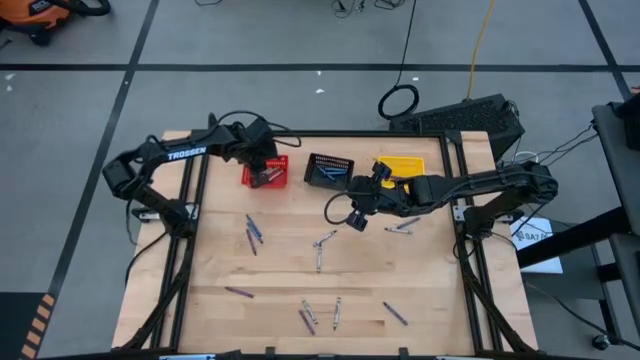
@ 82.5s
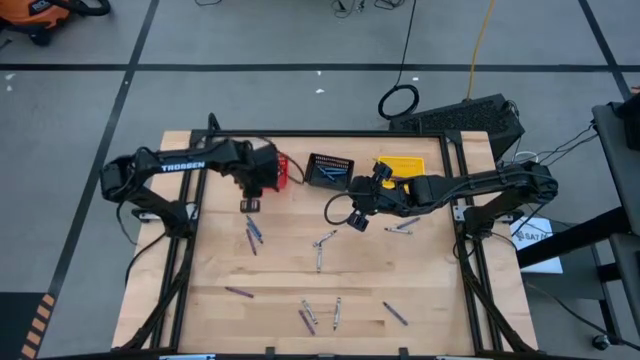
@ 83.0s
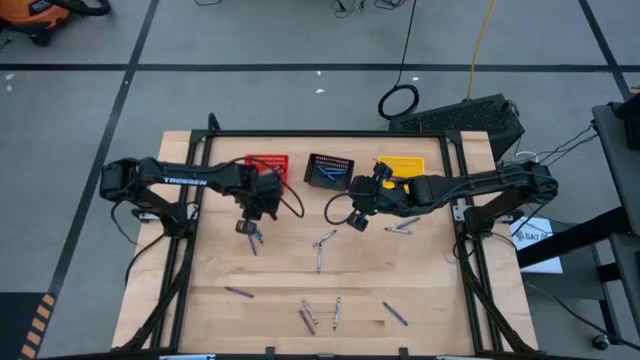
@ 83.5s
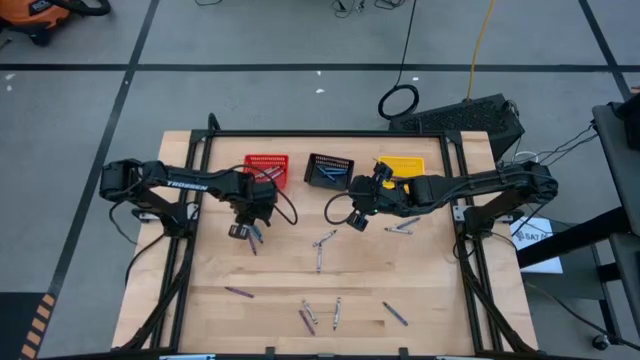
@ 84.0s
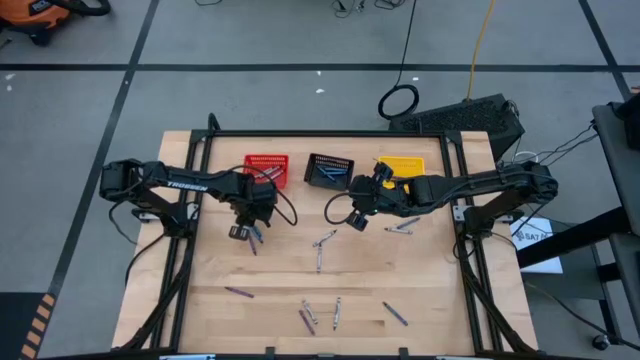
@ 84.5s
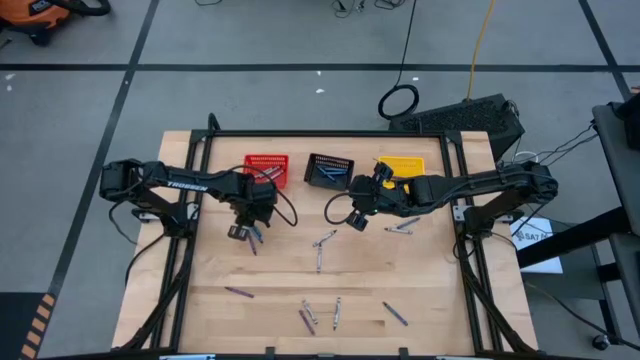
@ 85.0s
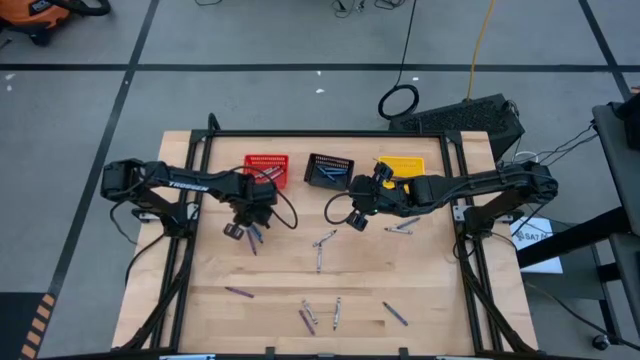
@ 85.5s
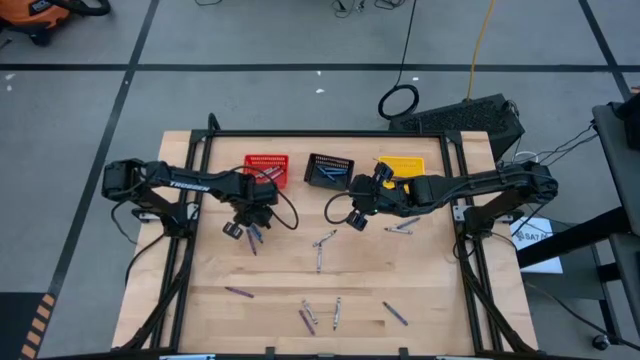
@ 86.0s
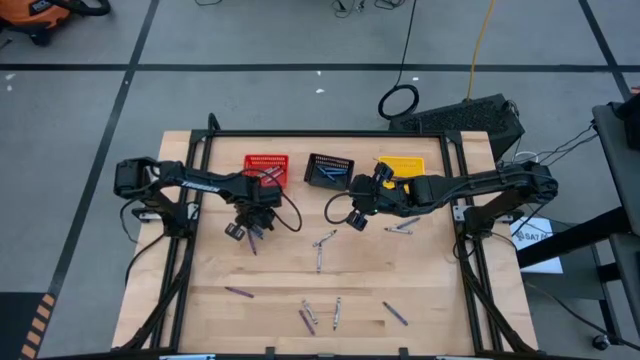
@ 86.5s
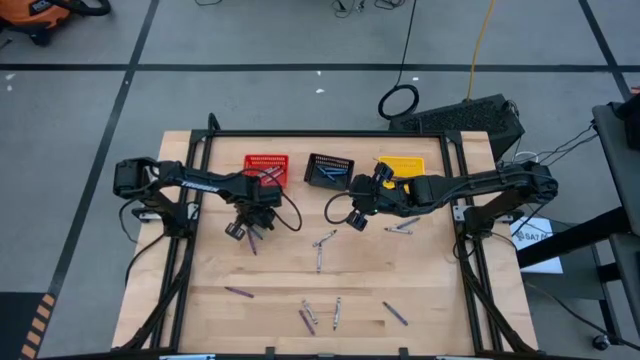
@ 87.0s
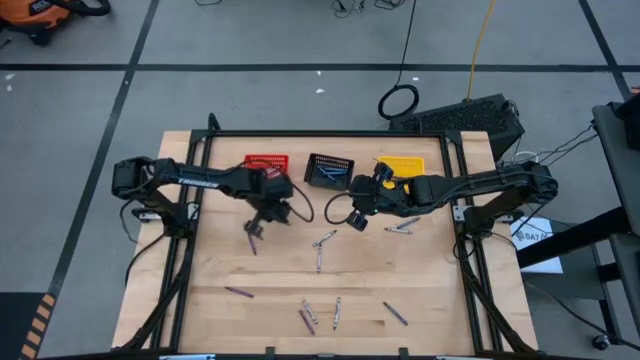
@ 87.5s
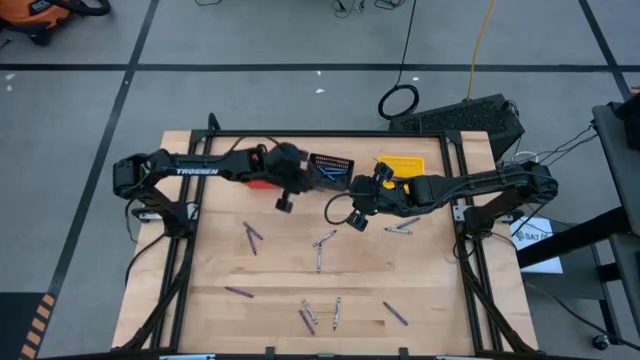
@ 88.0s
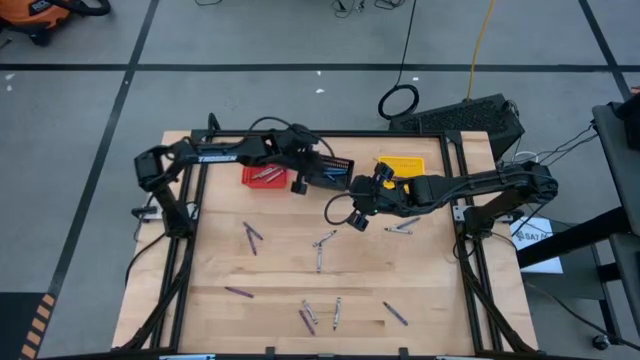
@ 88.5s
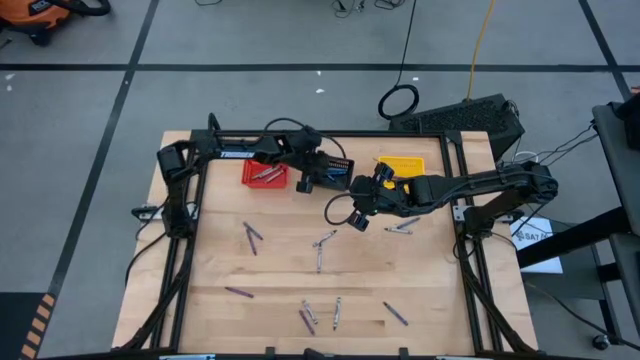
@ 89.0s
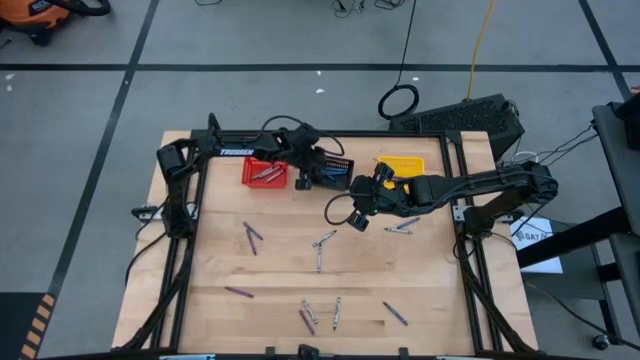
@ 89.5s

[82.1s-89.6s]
Task: Sort crayons
Put the blue crayon into the black bin

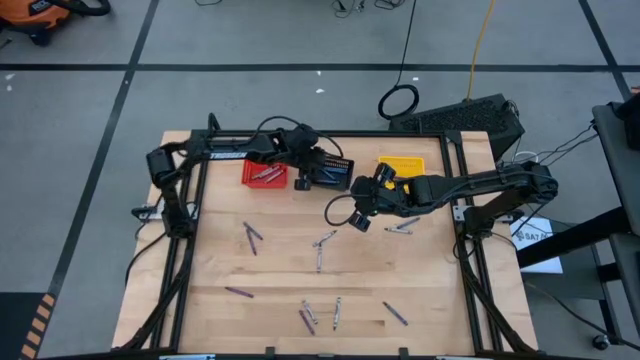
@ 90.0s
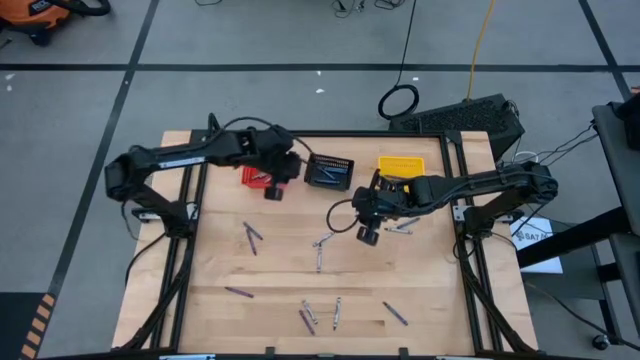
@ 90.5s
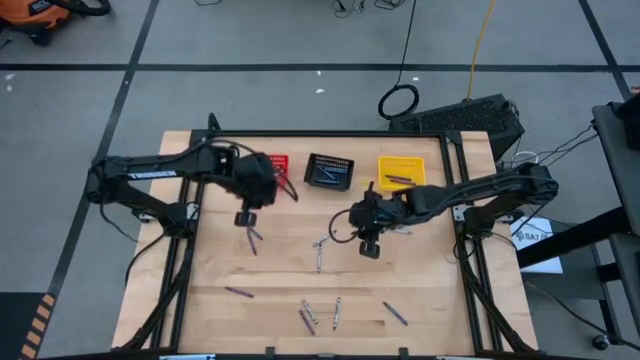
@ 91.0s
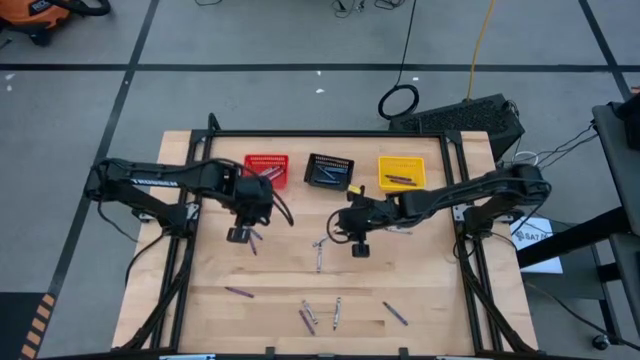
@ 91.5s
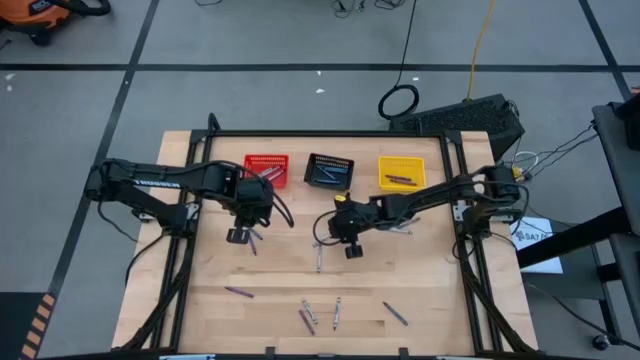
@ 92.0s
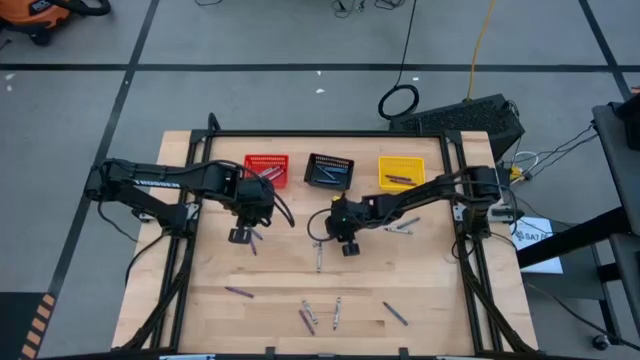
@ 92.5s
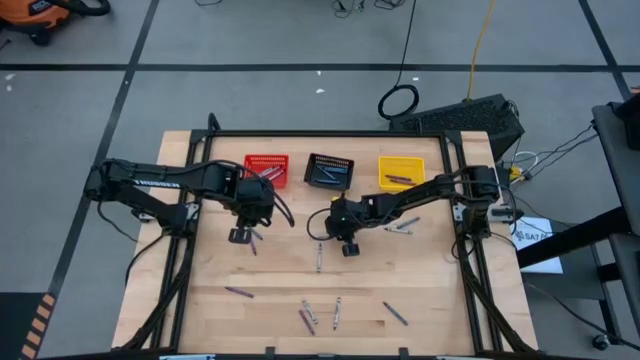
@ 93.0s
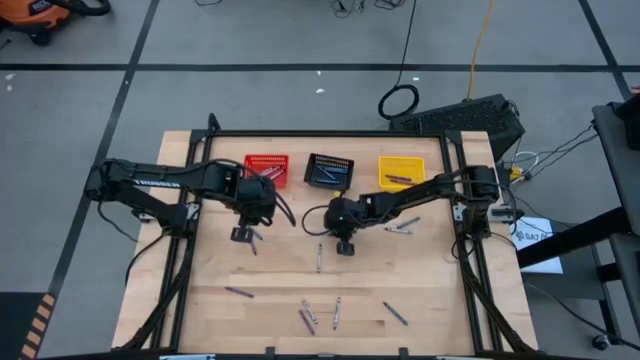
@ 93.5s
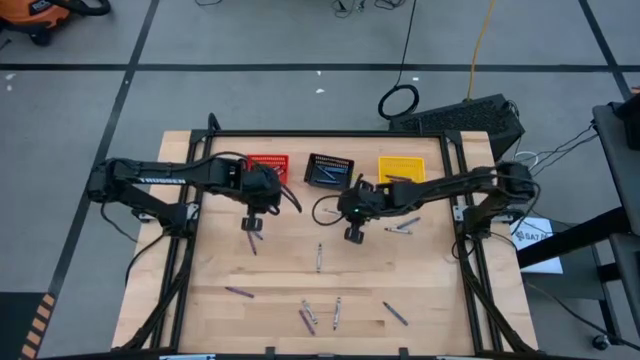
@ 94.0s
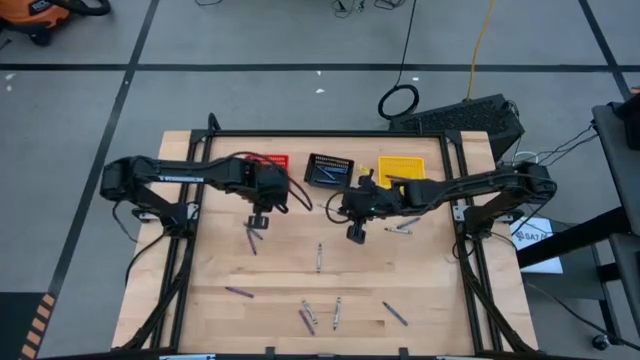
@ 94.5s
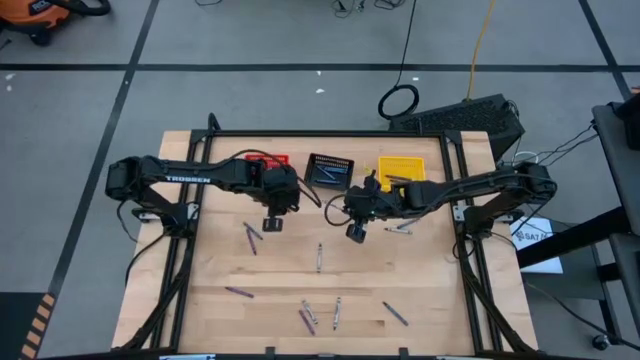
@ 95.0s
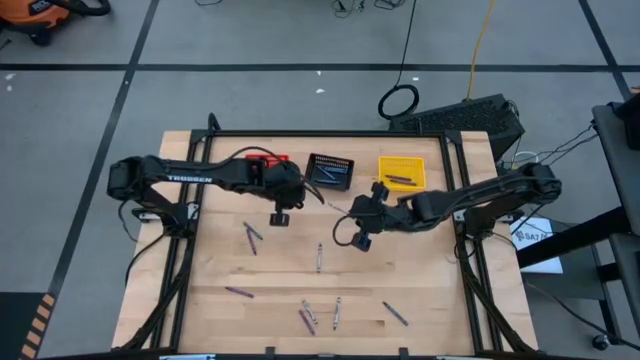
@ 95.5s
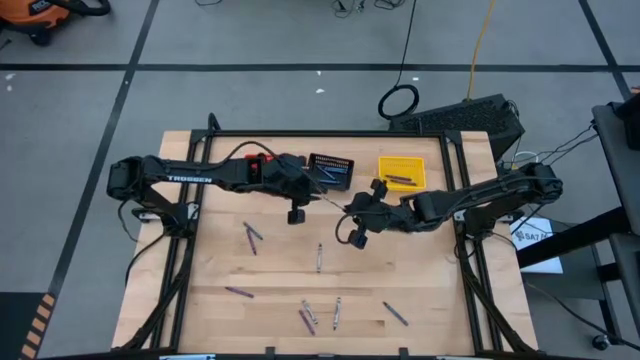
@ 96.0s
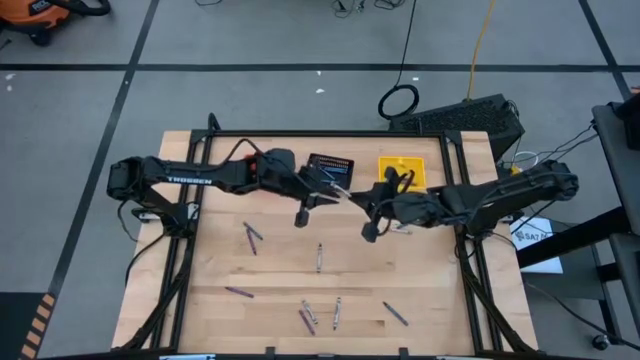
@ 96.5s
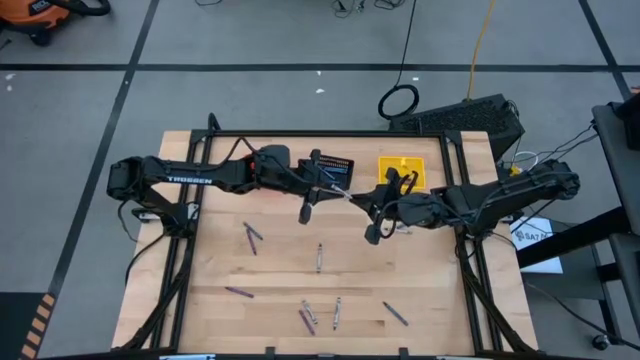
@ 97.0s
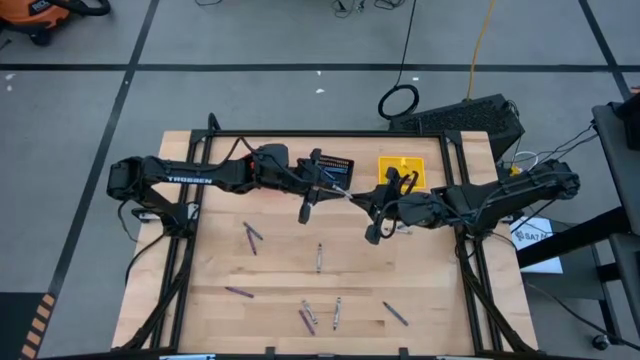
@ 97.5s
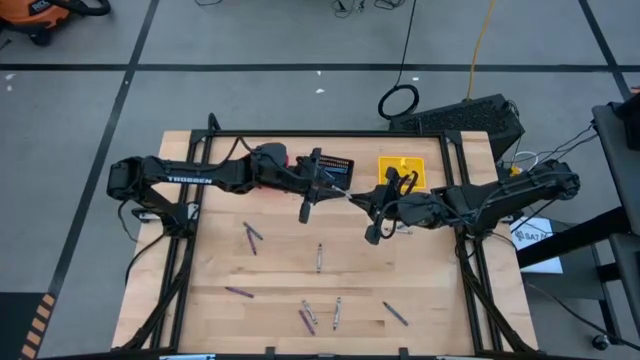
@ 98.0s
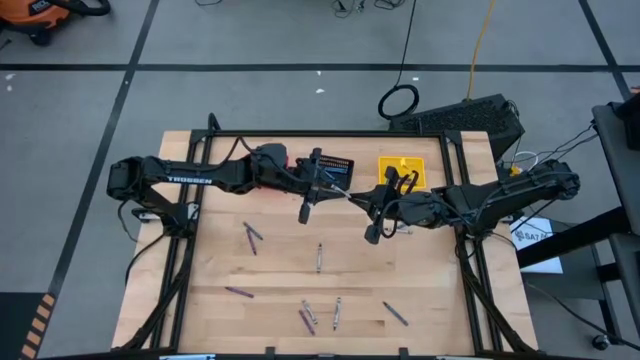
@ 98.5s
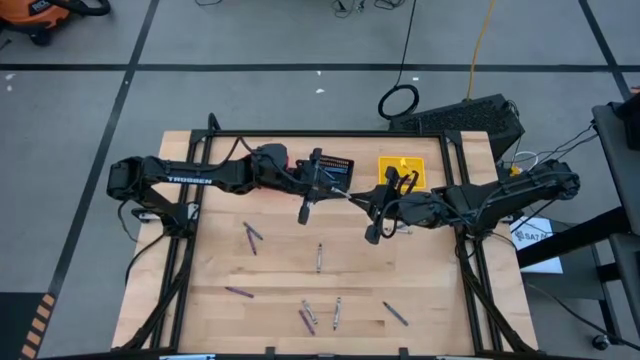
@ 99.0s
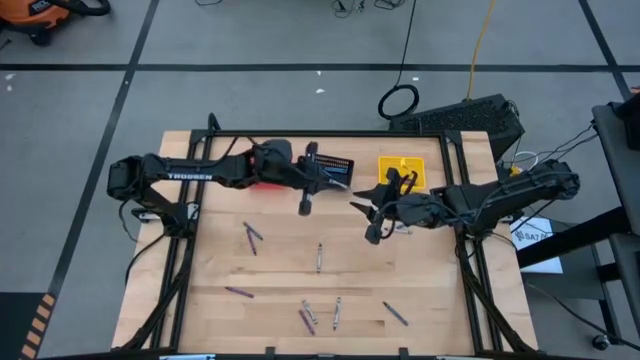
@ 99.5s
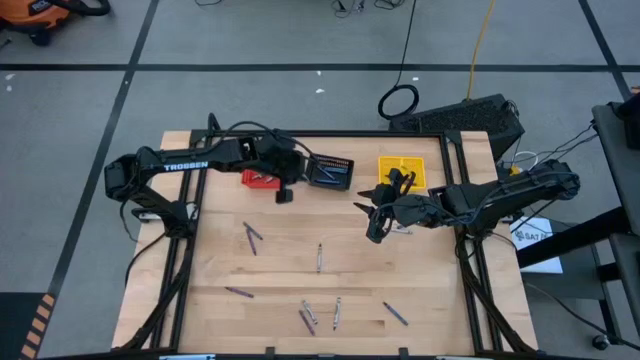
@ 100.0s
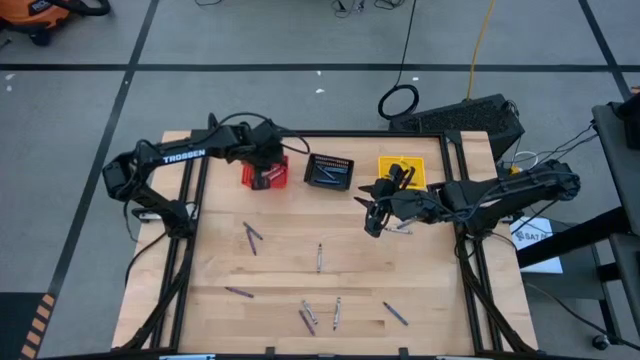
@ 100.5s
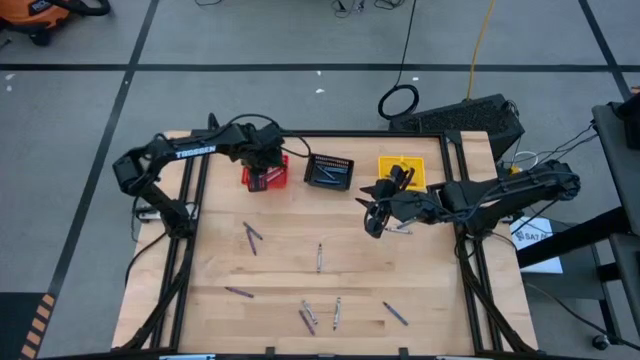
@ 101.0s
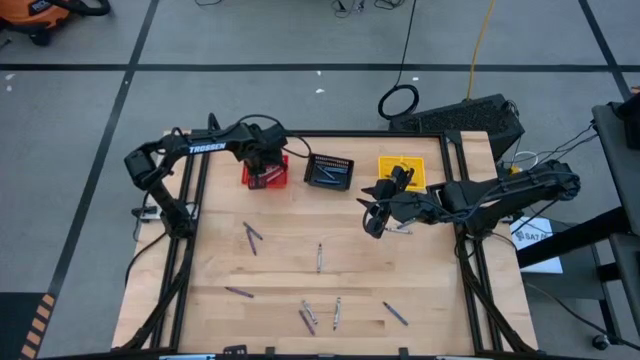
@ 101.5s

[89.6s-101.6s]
Put the gray crayon into the red bin

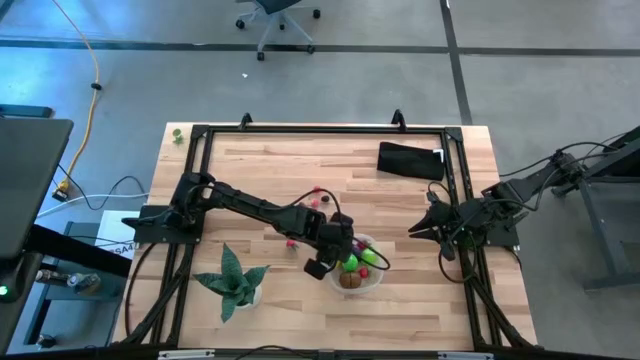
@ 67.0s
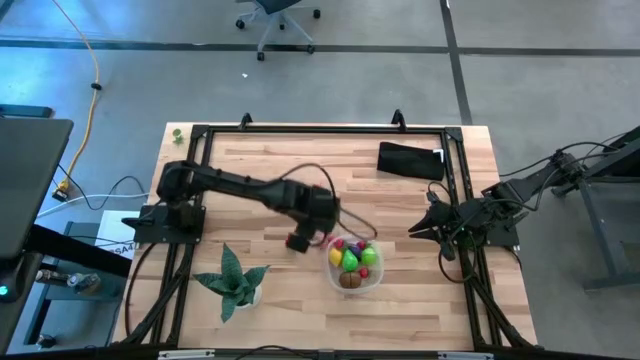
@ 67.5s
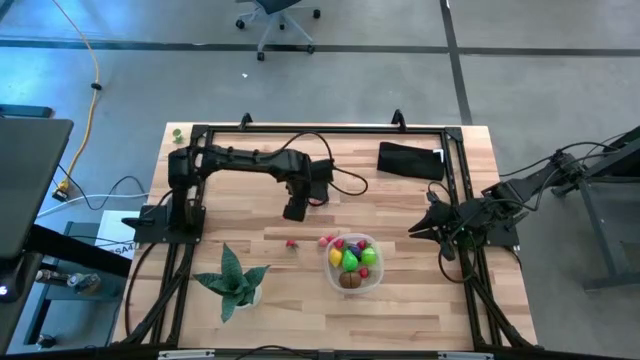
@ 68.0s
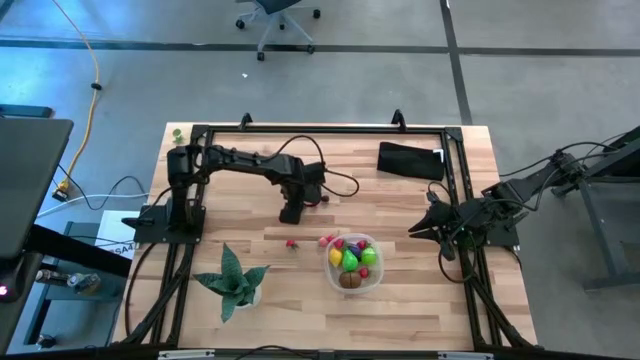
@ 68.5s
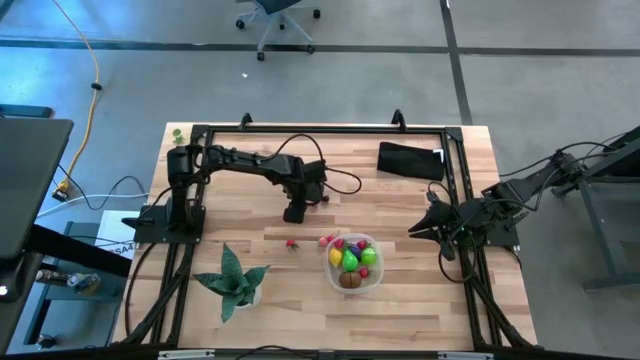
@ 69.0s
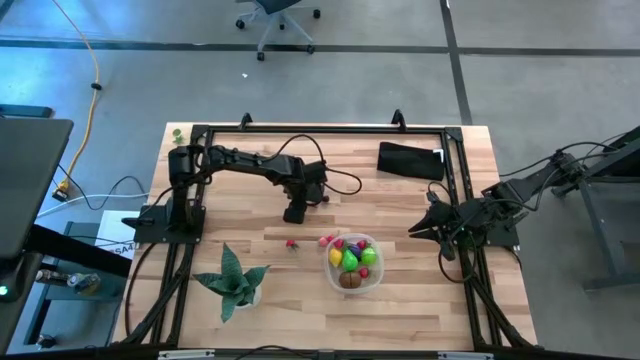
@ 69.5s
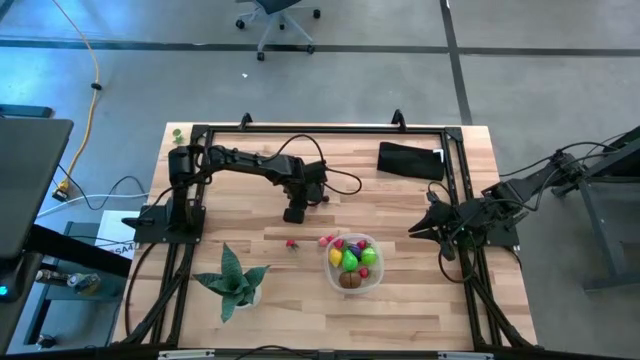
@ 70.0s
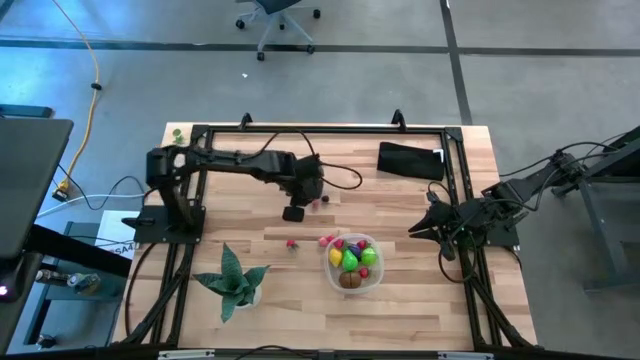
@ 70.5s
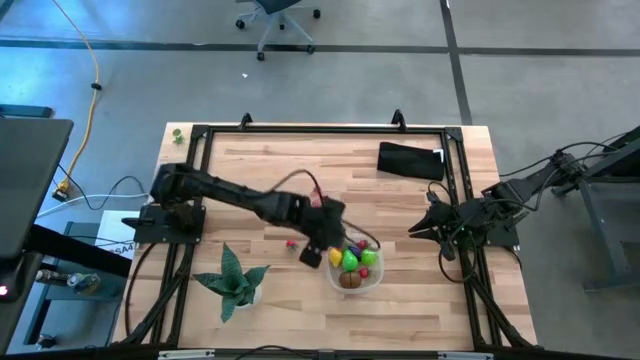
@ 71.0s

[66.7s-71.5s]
Task: Pick and placing Produce into tupperware
Put the left cherry into the transparent bin
